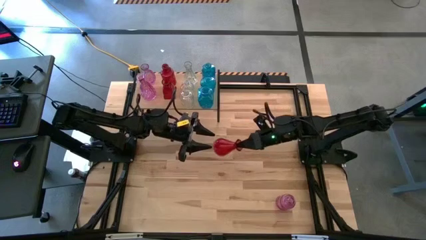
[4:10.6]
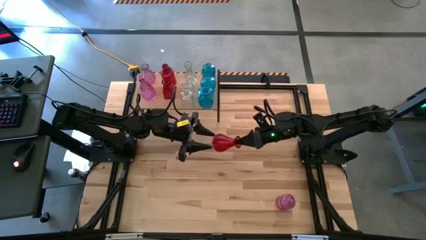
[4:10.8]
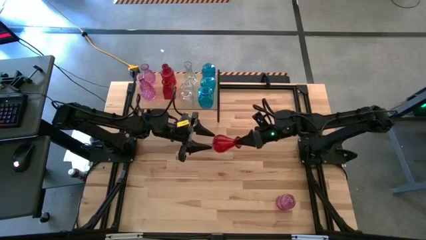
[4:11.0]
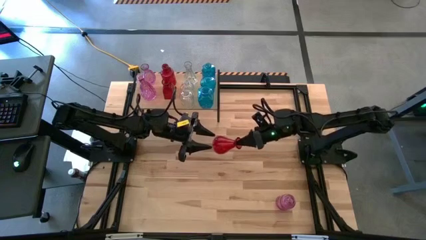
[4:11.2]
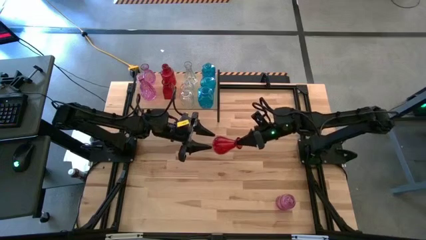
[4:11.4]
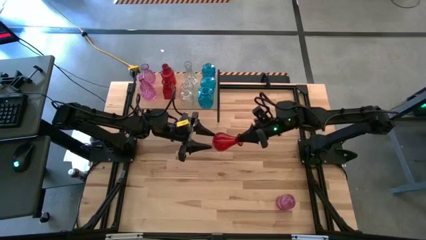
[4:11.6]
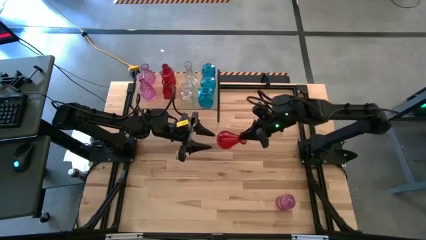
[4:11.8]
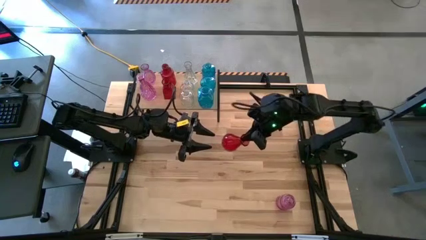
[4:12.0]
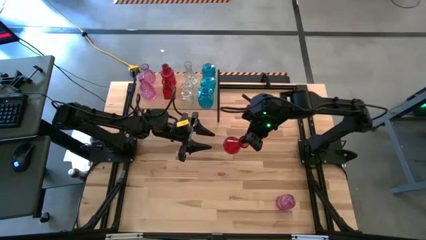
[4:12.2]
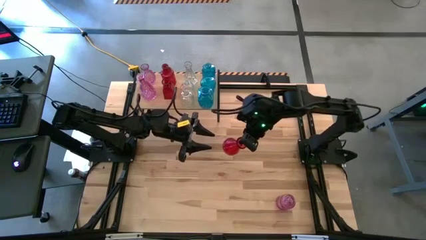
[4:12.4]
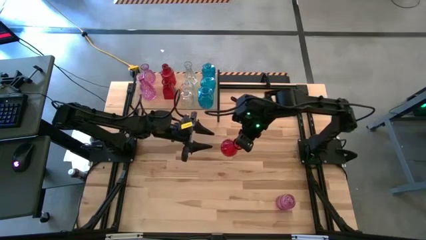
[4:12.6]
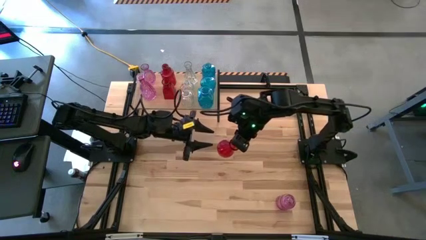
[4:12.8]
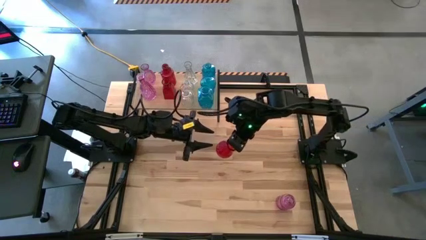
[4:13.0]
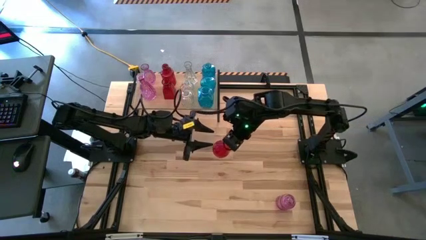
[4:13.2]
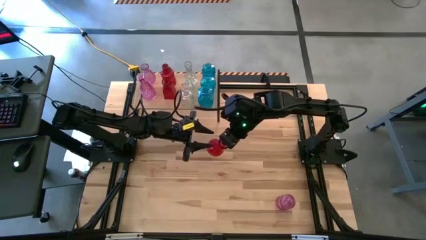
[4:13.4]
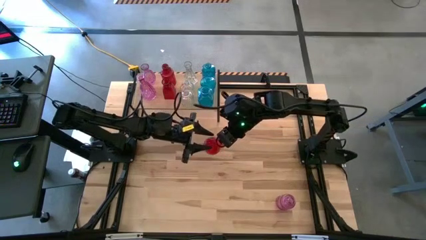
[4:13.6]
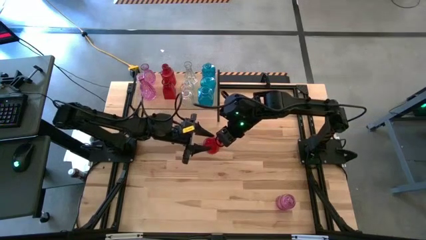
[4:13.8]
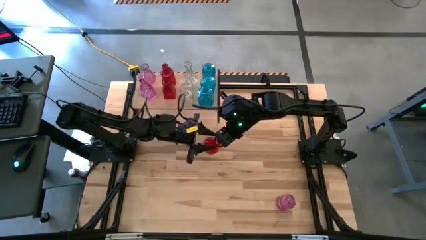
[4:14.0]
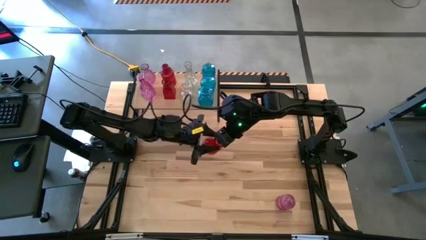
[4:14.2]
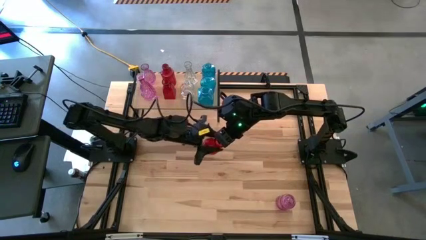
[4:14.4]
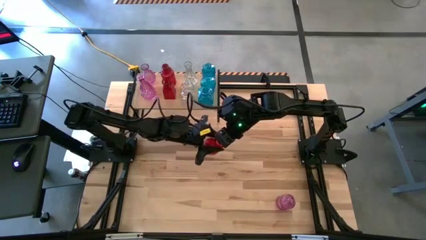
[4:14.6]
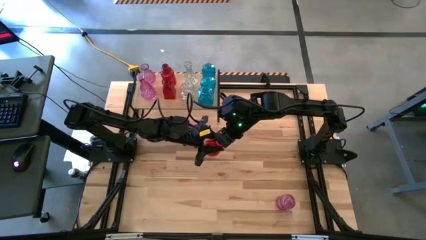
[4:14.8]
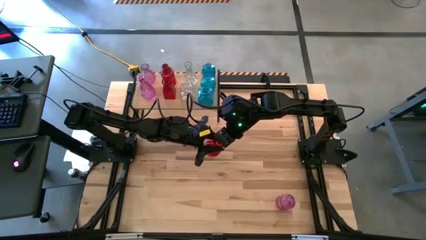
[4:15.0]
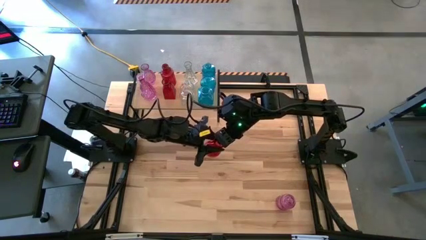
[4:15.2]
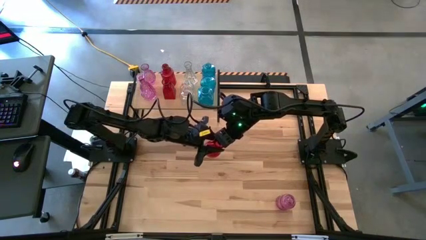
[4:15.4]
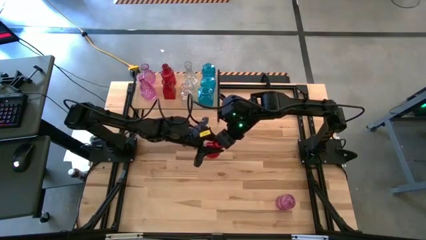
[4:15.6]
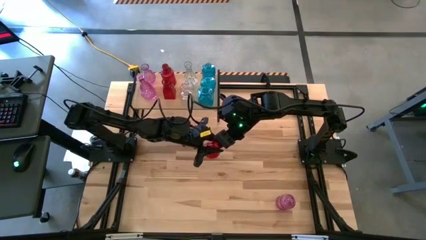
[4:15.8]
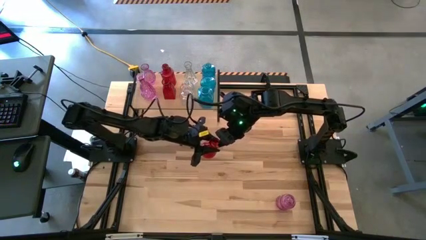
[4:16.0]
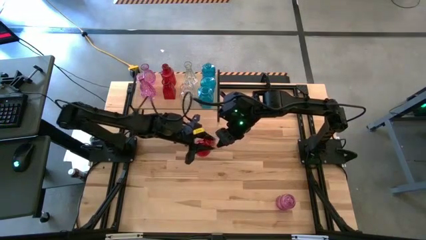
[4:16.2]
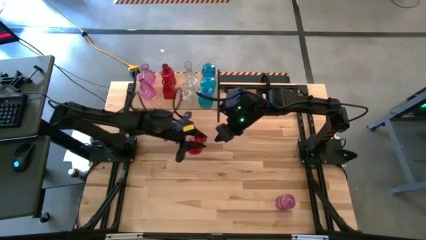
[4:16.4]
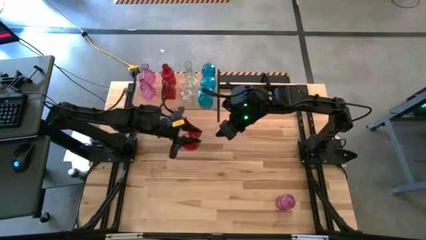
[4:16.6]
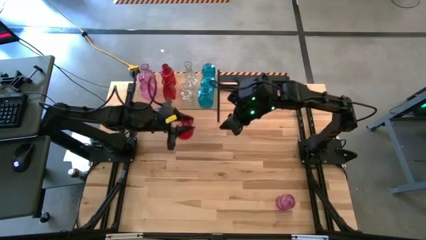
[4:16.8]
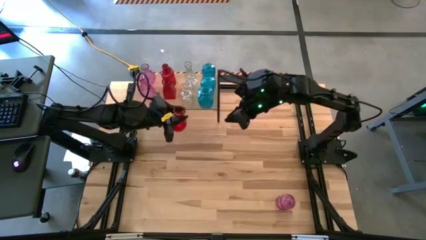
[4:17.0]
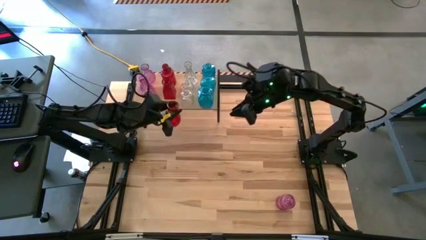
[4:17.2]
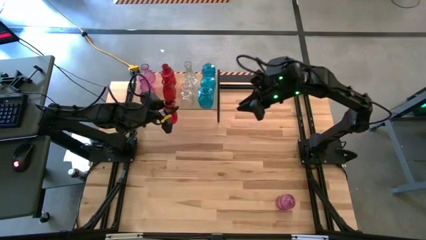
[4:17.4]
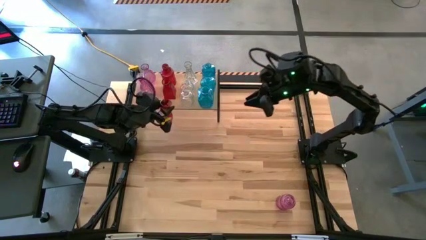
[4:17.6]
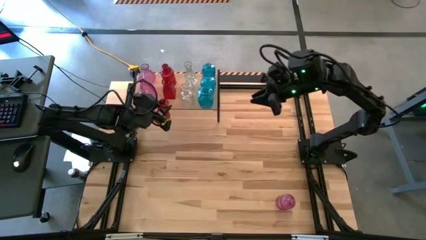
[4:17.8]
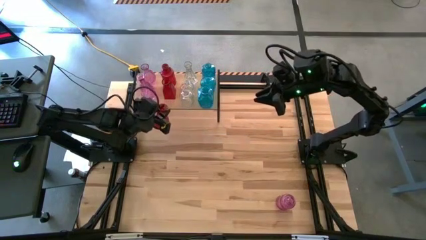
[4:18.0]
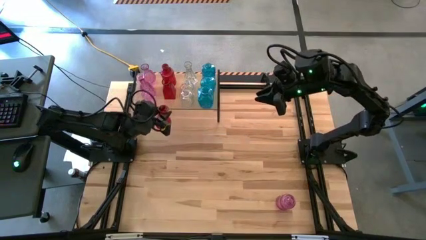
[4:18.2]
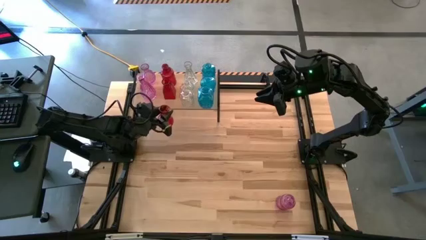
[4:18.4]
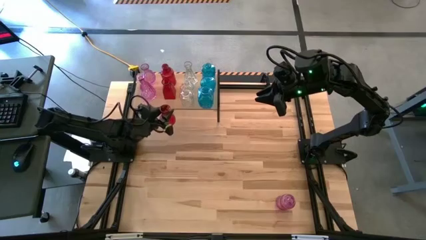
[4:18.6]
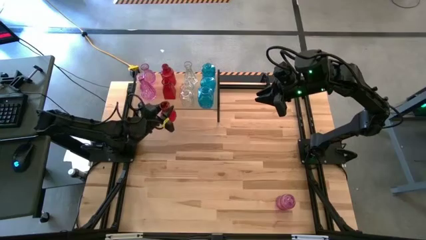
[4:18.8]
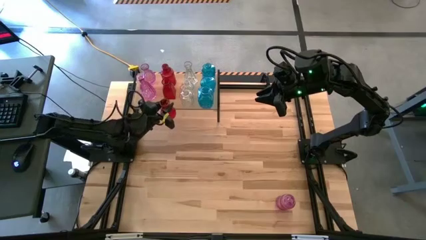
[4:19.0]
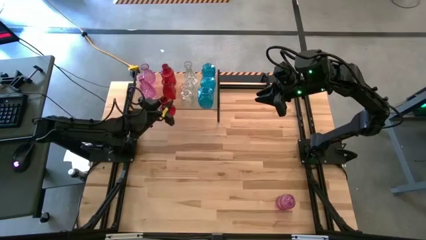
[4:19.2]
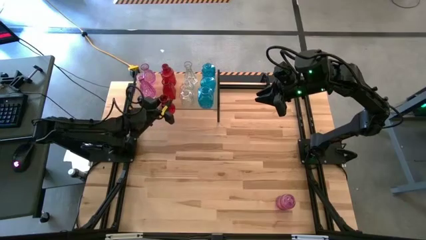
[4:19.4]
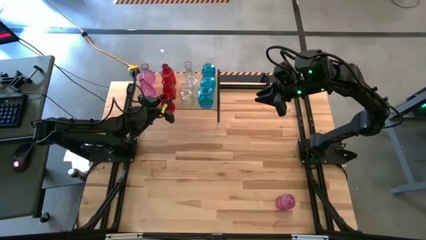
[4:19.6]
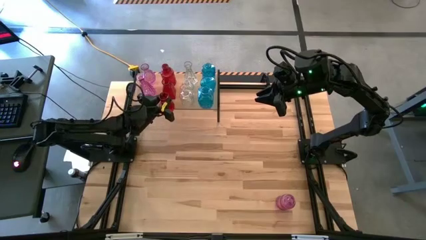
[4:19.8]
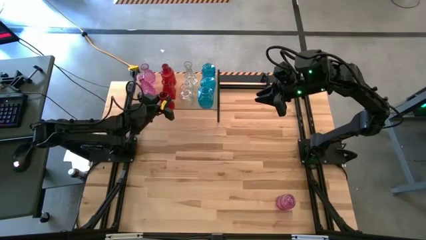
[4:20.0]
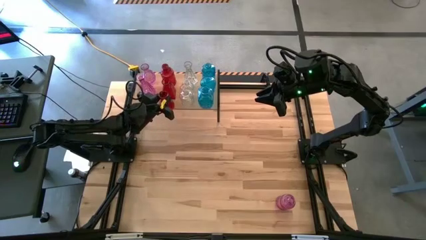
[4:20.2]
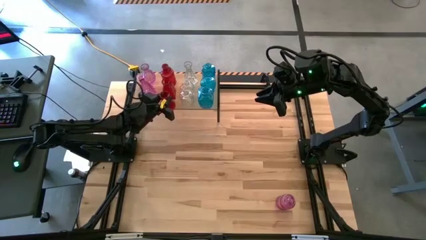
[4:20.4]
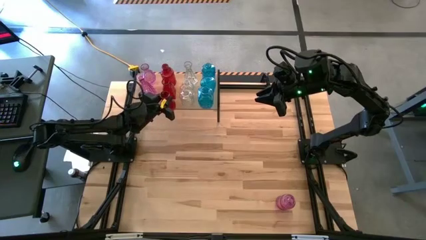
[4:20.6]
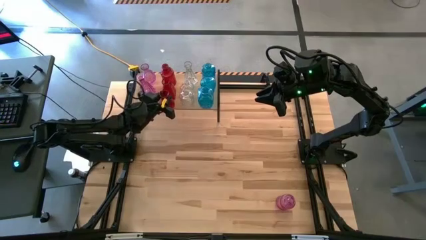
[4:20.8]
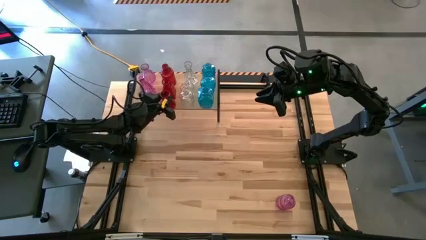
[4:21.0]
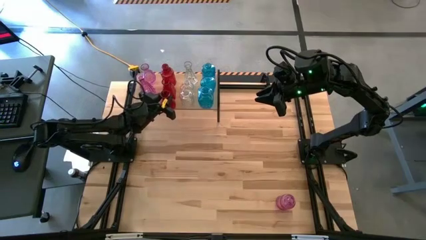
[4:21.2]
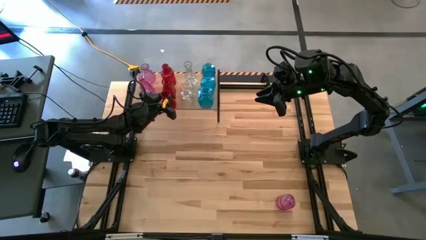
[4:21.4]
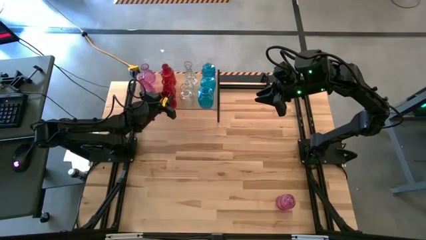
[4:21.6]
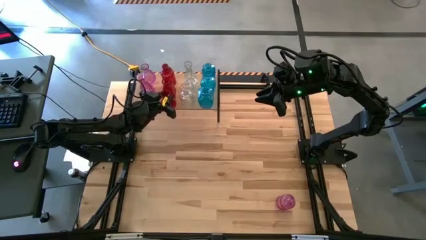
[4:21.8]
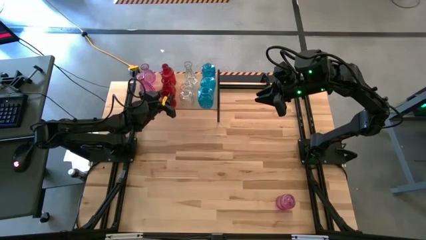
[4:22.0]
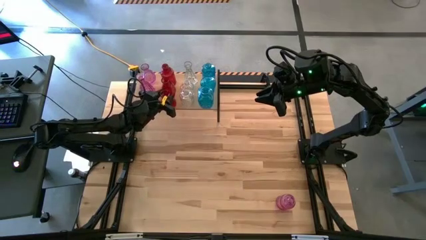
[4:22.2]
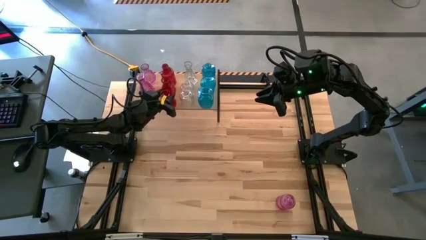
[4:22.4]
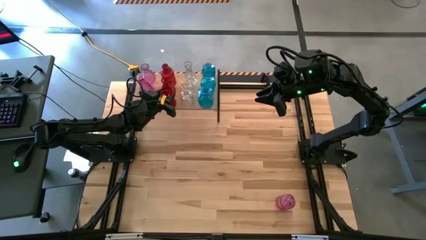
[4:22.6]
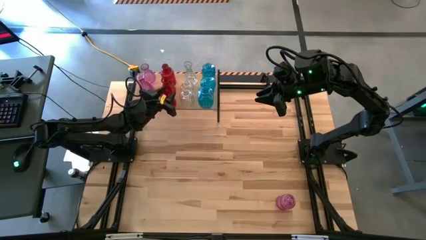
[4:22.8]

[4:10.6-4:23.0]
Task: sort vases onto shelf
Put the red vase on the shelf aligned with the other red vases

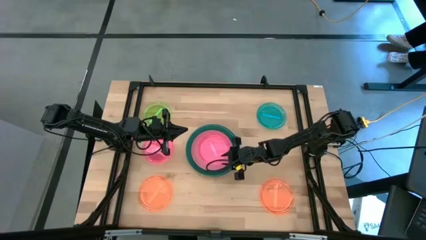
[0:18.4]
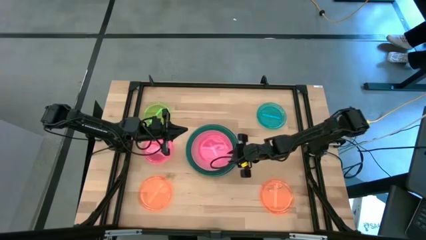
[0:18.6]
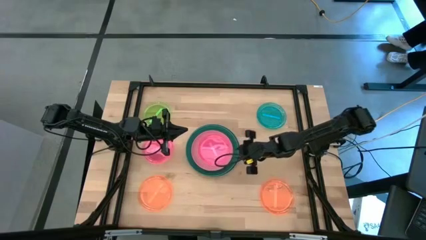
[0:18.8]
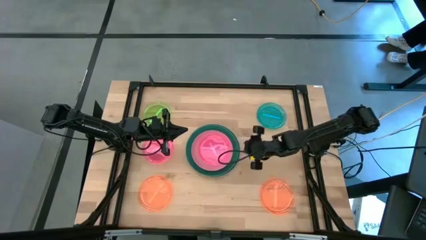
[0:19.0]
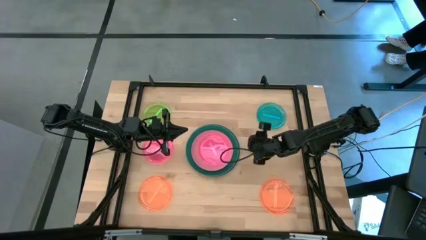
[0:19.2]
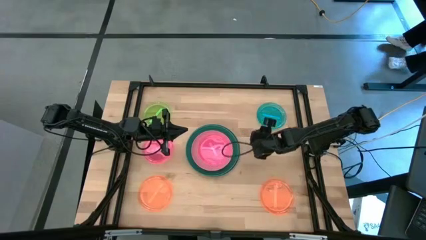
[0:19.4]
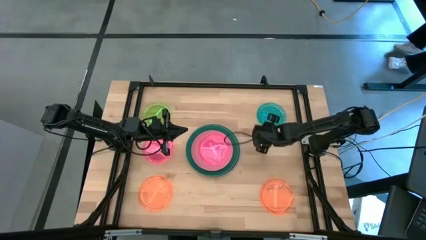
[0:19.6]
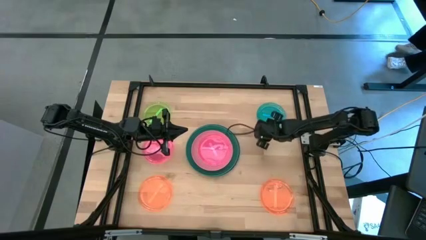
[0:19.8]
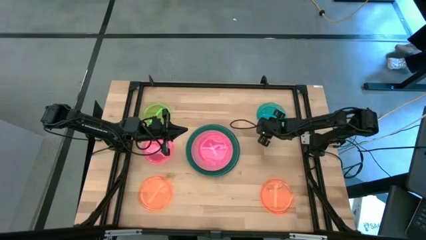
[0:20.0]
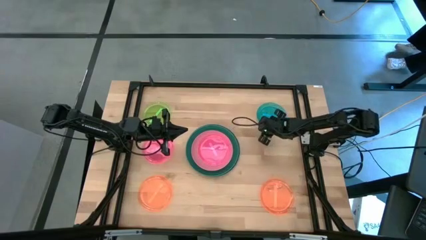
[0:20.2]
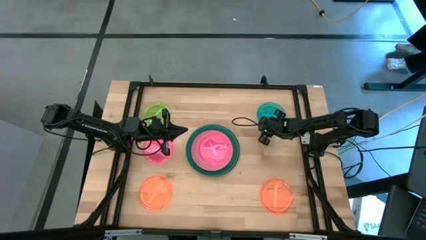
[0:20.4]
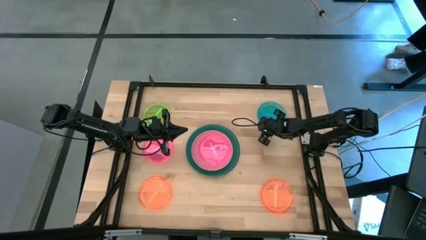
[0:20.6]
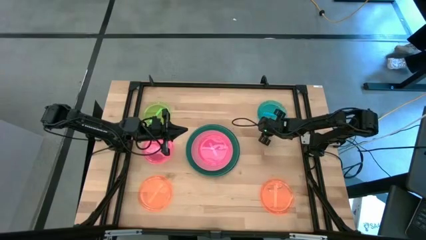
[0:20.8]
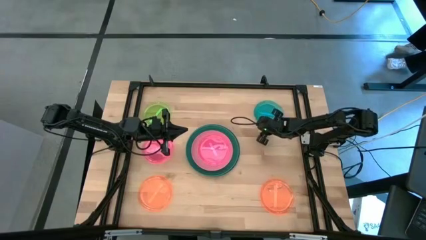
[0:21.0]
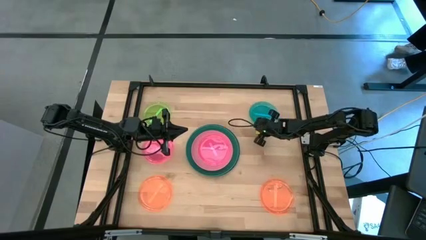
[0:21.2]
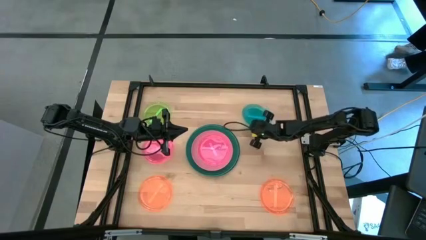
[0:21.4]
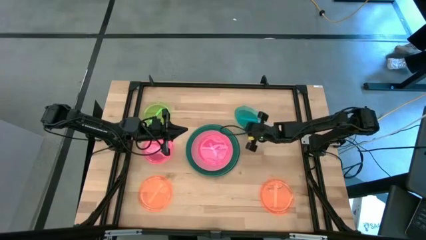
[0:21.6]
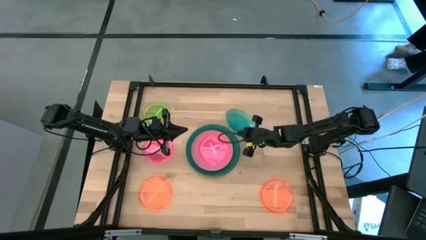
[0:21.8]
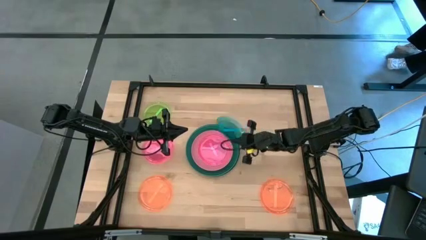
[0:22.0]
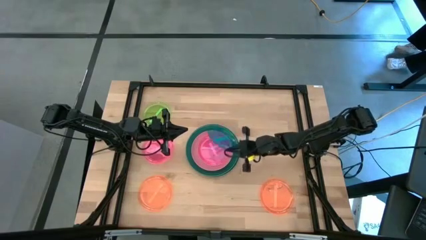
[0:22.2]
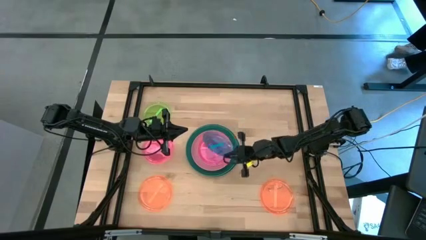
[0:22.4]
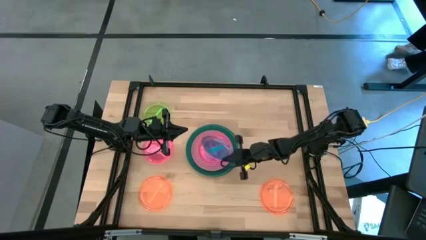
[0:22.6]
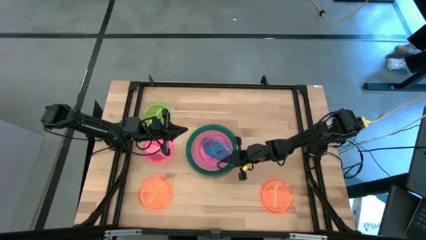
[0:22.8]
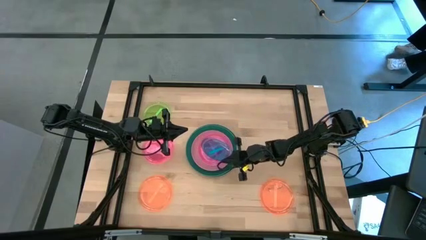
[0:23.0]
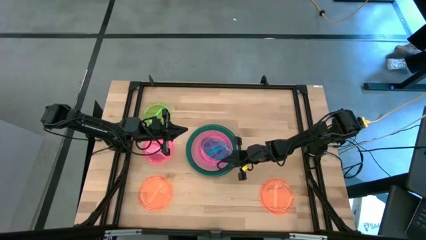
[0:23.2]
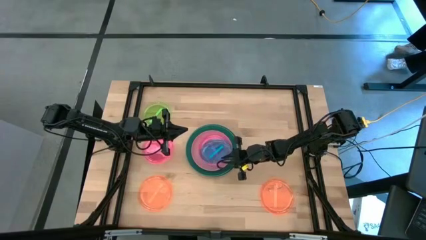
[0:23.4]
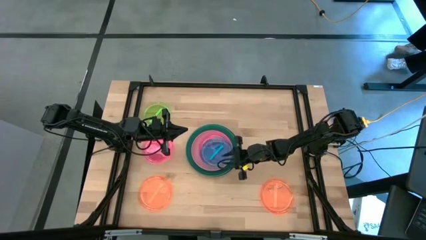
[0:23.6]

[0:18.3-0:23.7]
Task: Stack plastic plates
Stack the blue plate on top of the light pink plate
